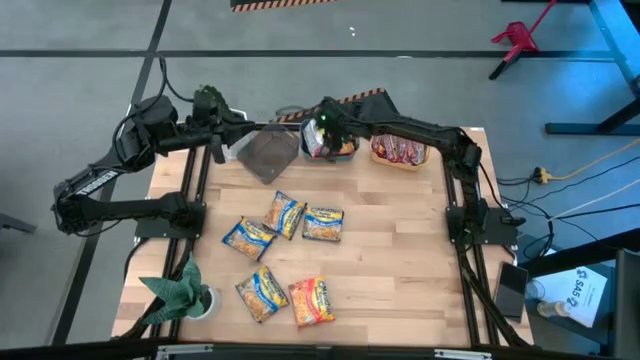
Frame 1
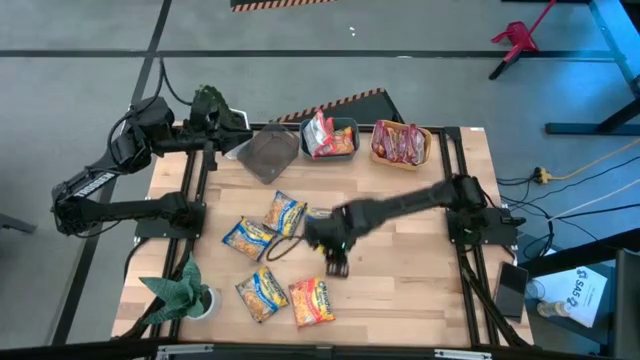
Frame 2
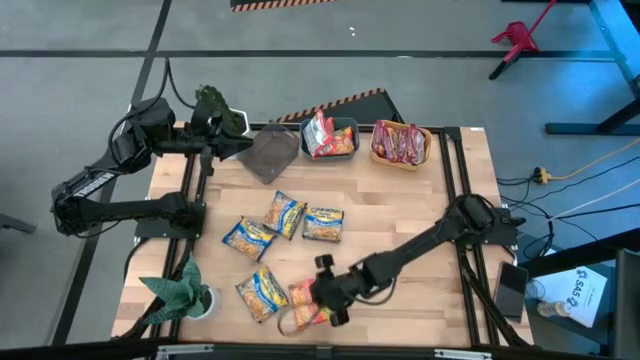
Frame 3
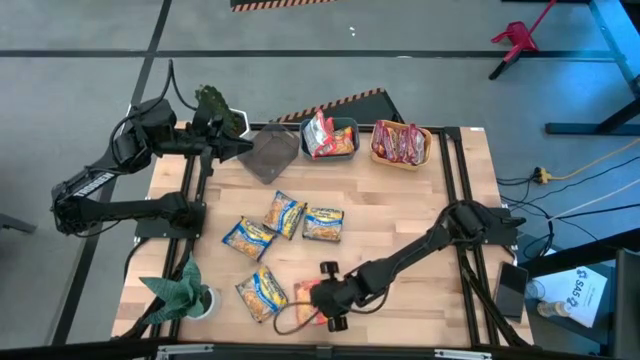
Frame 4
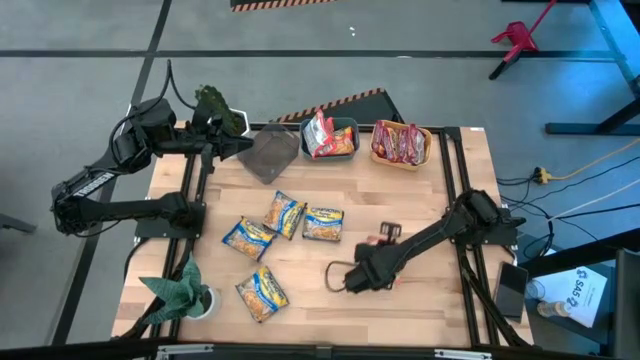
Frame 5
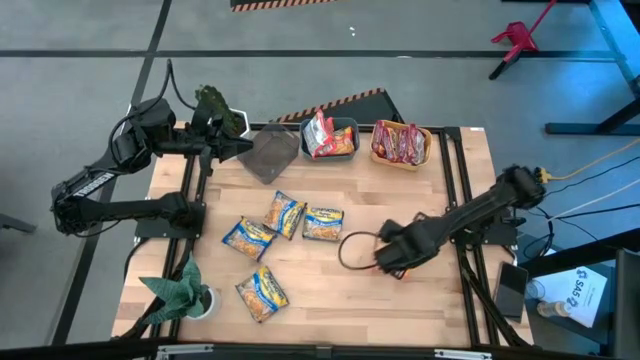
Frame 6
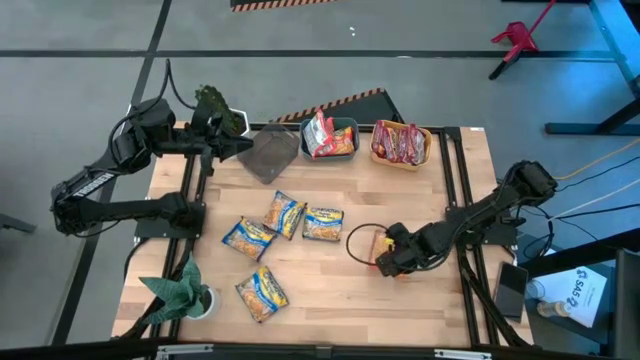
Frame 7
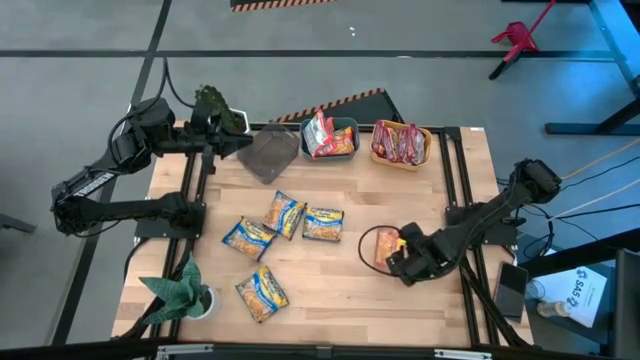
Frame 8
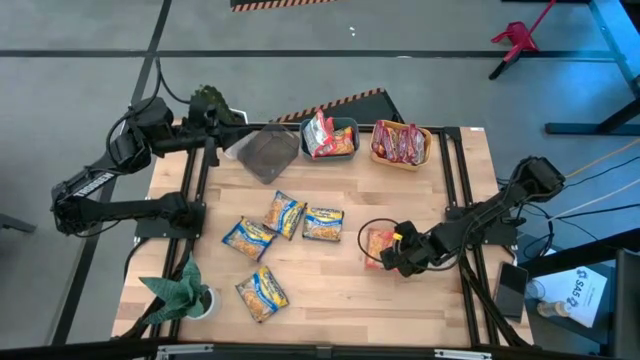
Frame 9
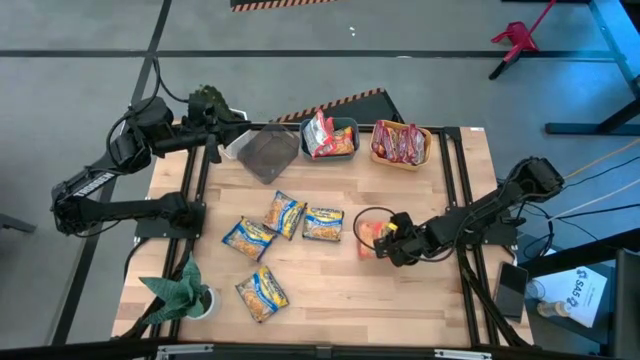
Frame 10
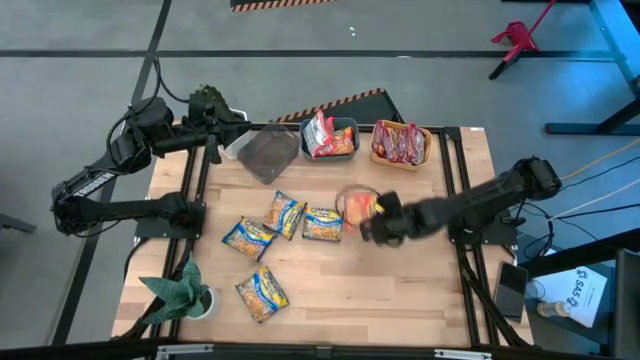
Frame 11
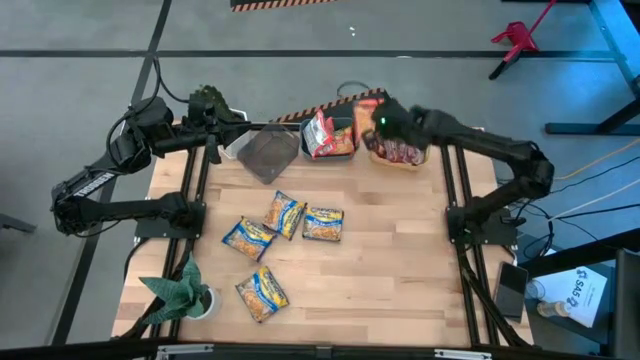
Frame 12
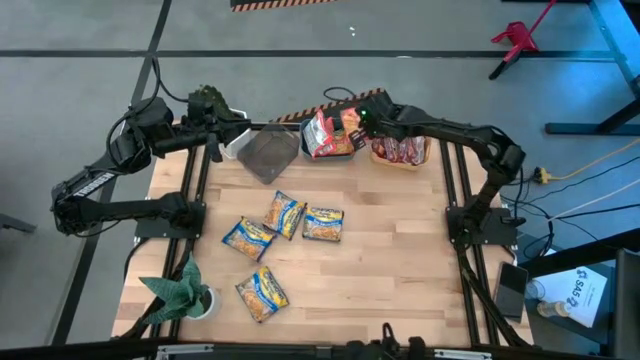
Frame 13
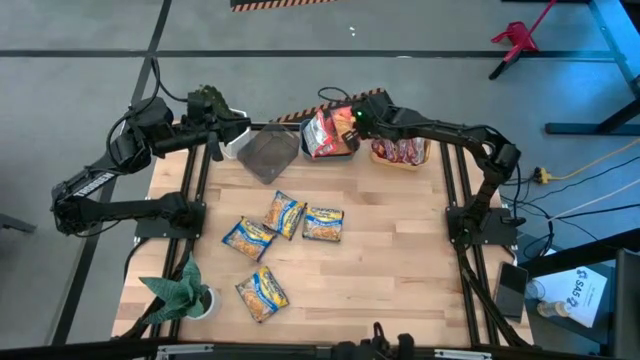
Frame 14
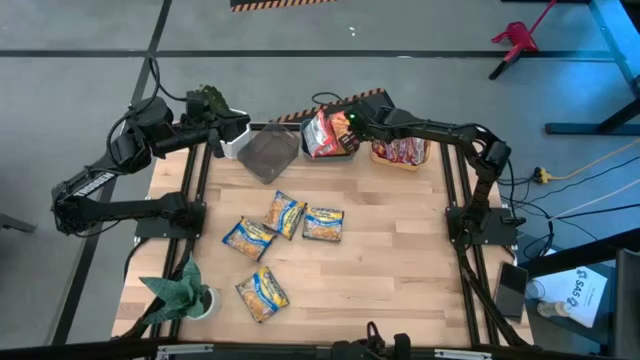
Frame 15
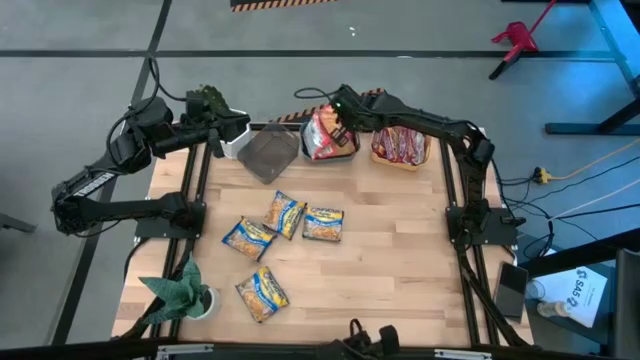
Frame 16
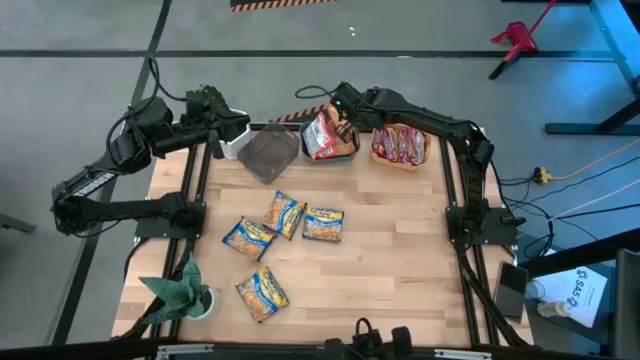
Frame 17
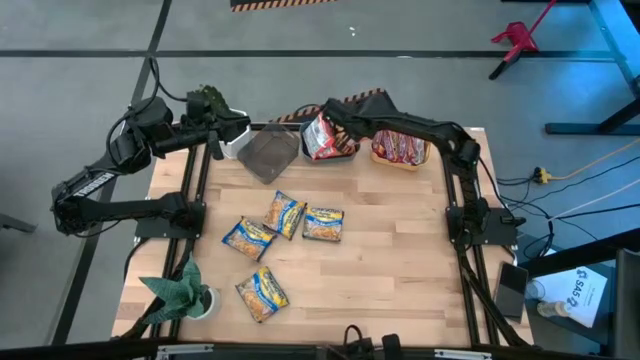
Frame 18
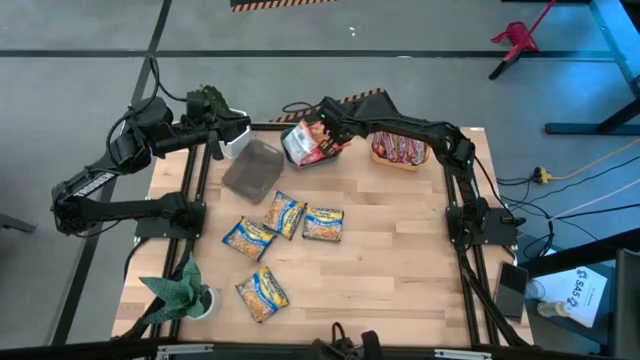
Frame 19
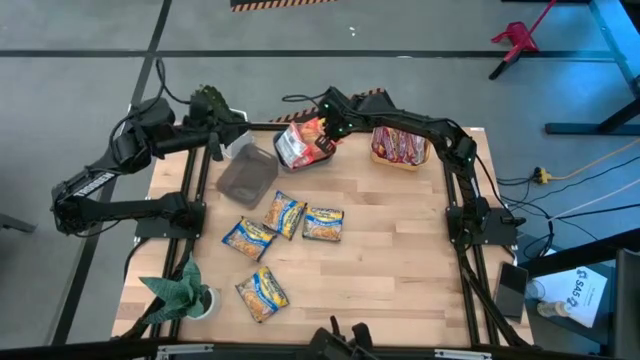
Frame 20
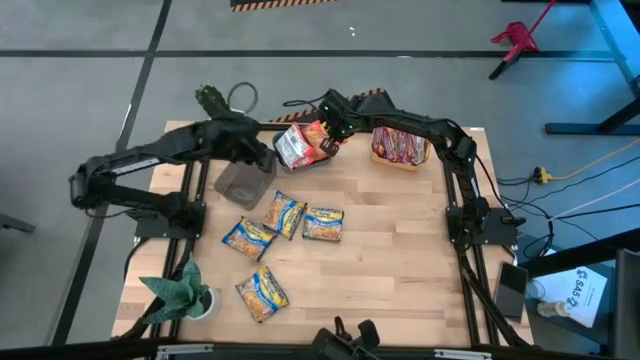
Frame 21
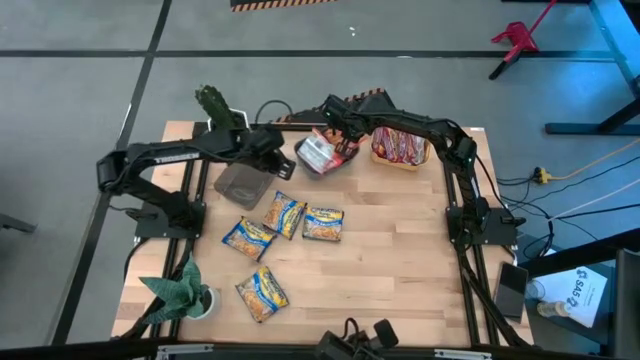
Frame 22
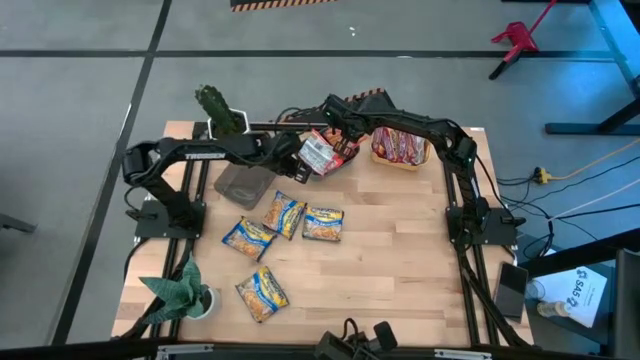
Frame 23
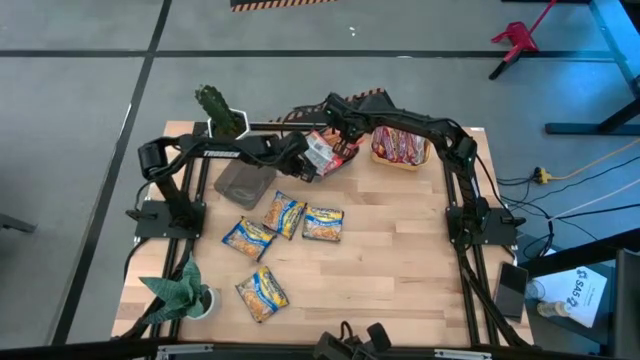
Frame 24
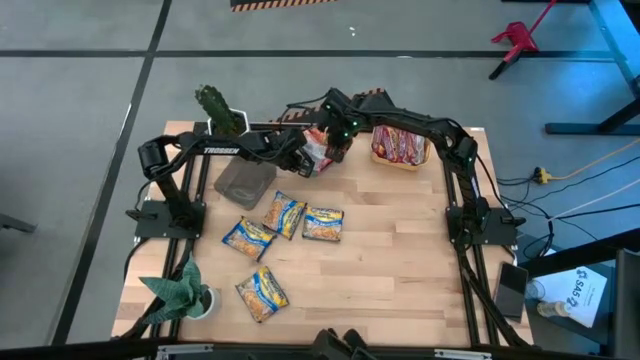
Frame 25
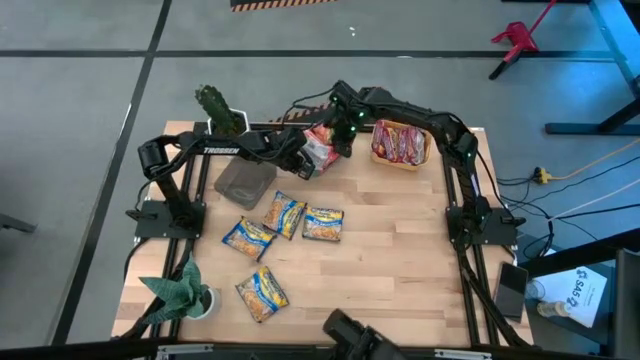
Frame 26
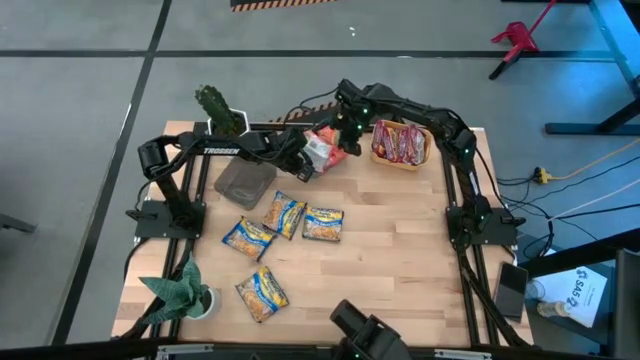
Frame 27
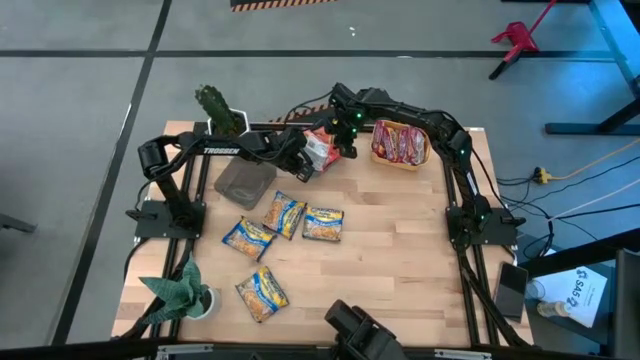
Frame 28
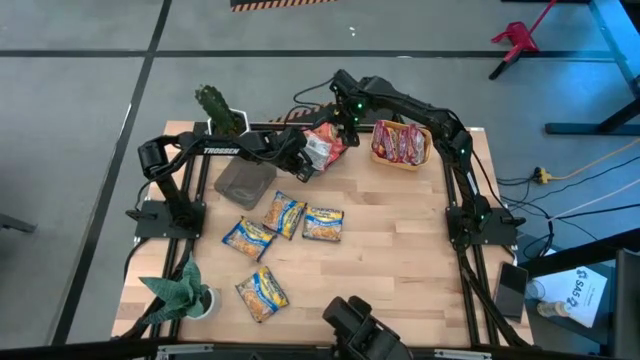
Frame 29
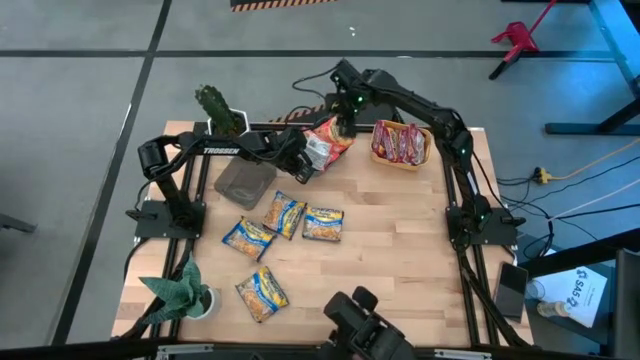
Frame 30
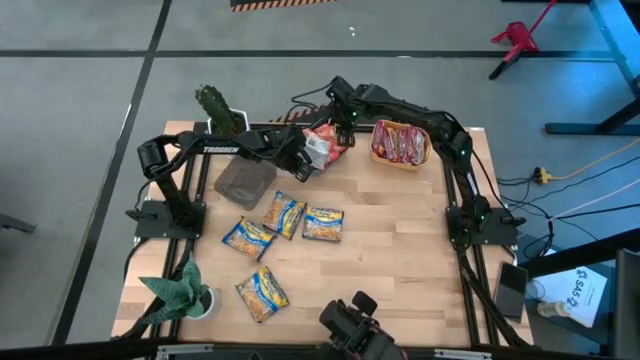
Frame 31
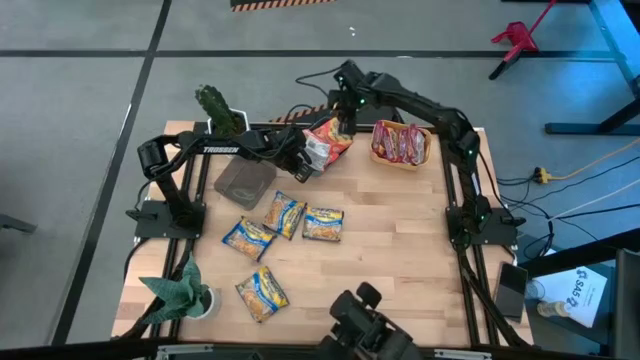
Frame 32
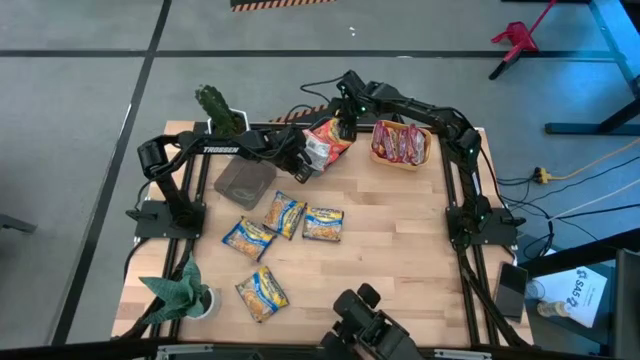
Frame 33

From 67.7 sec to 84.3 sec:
Task: Sort Maruchan noodles
Put the orange noodle pack into the blue bin

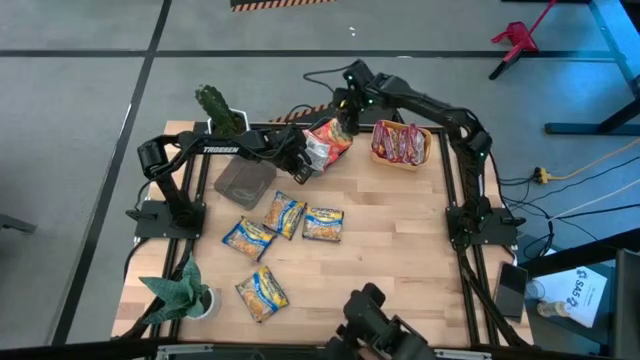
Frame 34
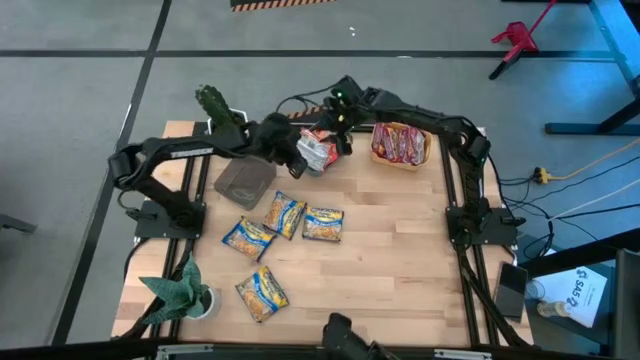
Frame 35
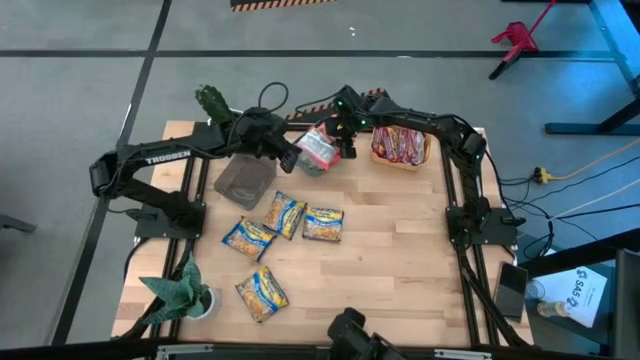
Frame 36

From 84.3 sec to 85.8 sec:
Adjust the orange noodle pack in the blue bin

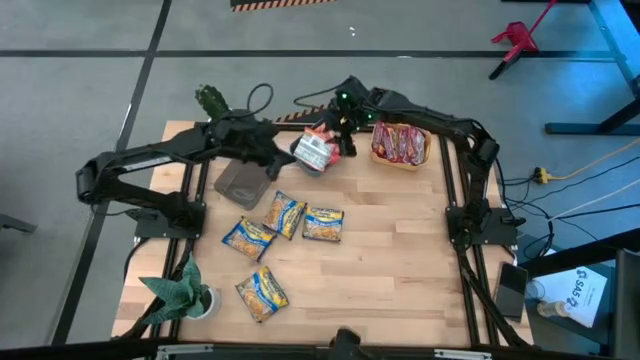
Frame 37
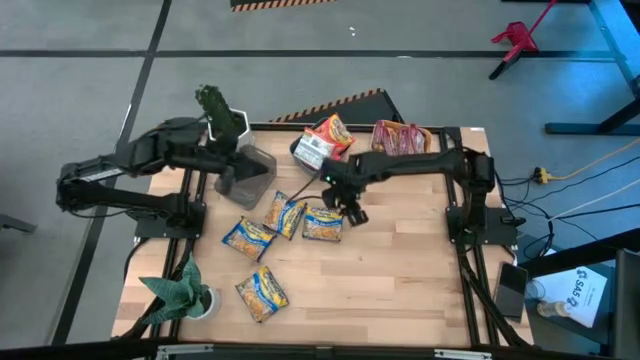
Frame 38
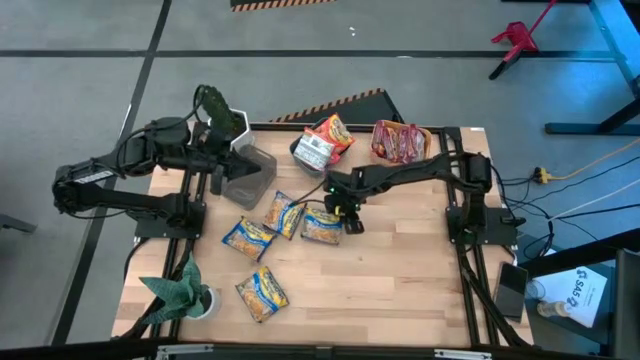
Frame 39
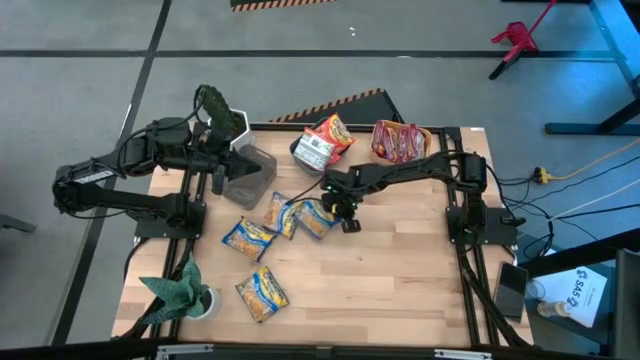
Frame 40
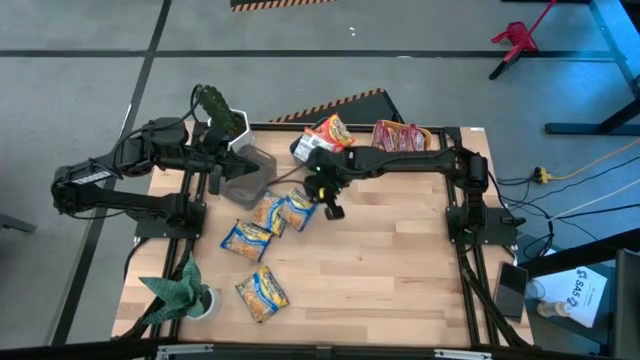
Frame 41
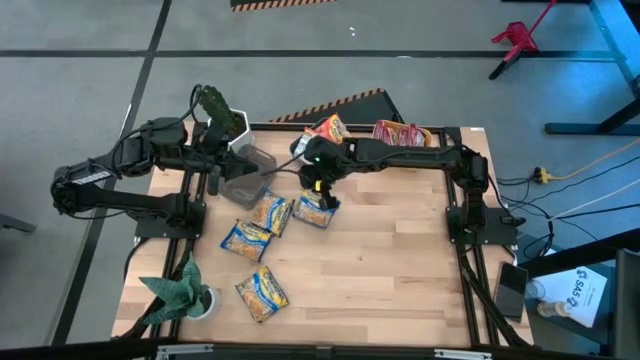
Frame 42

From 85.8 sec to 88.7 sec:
Put the blue noodle pack into the black bin

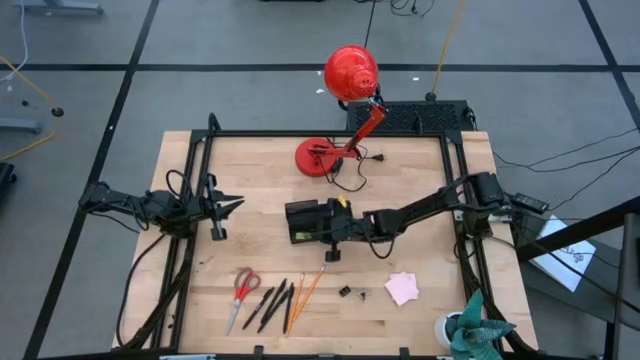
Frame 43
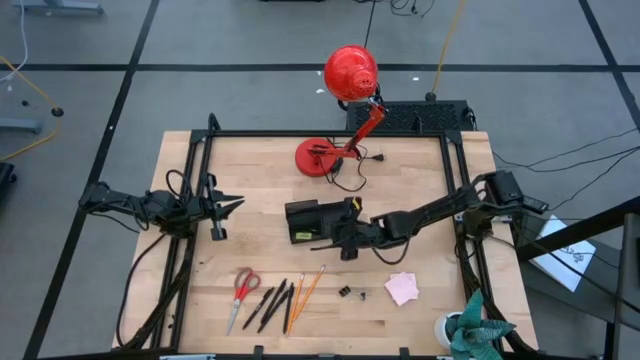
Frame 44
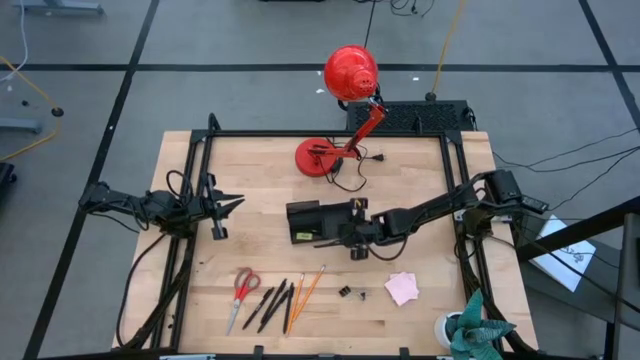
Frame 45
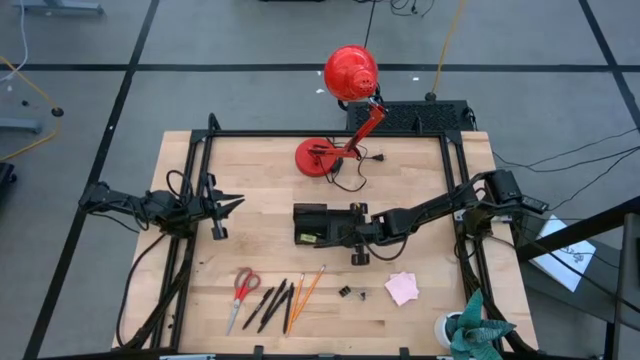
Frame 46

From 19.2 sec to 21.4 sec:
Task: Pick and place office supplies into organizer
Adjust the desk organizer
